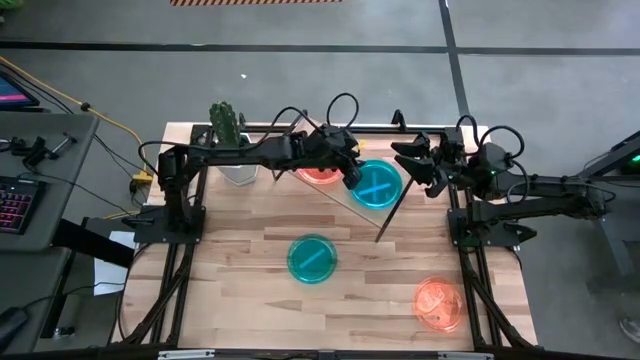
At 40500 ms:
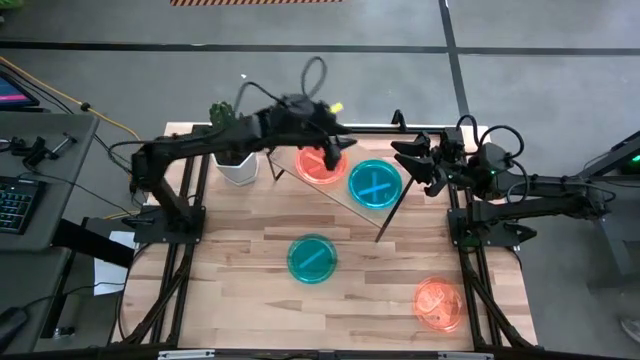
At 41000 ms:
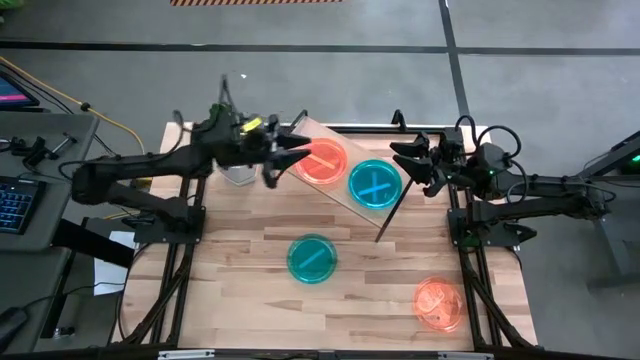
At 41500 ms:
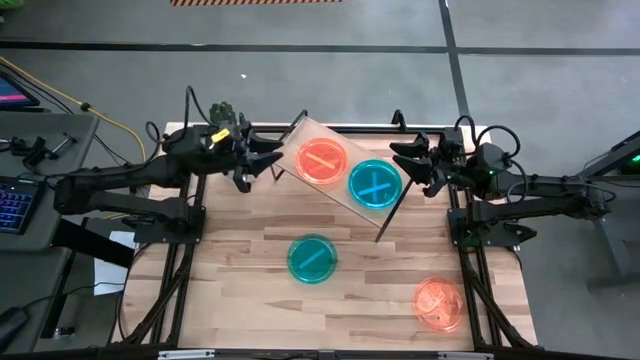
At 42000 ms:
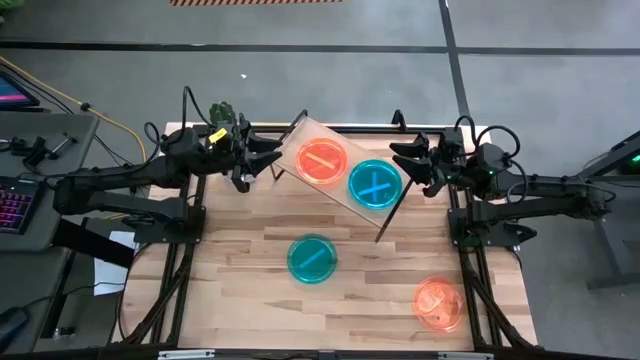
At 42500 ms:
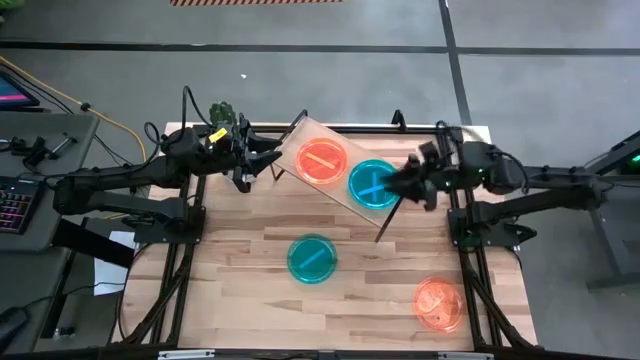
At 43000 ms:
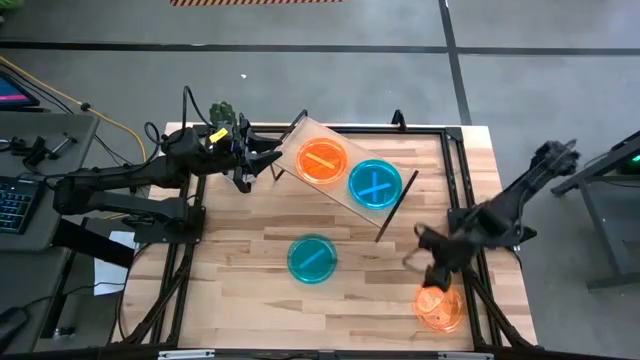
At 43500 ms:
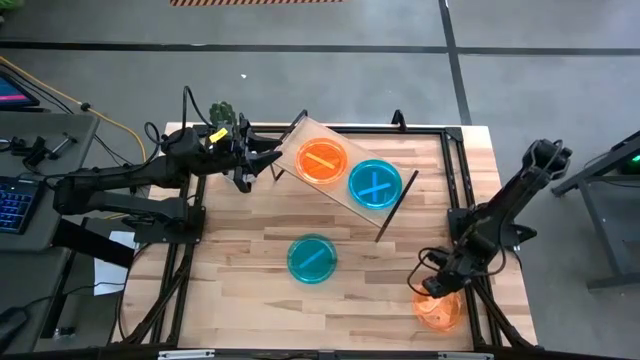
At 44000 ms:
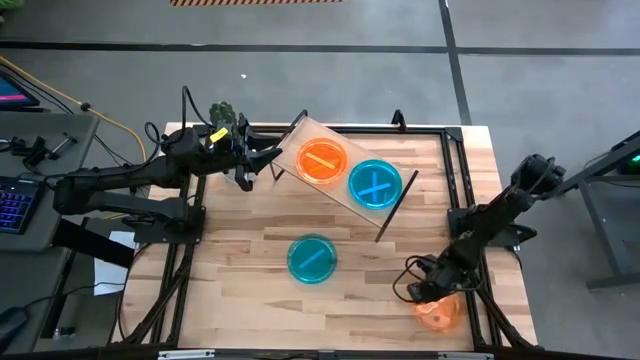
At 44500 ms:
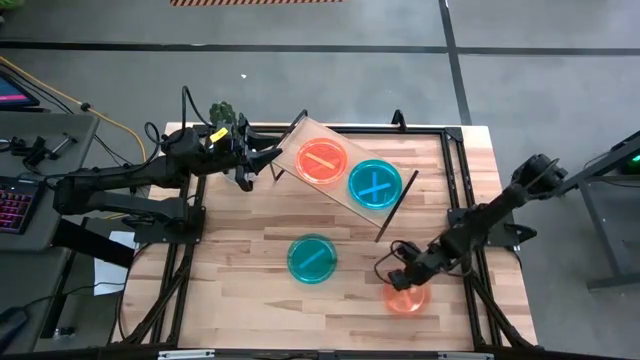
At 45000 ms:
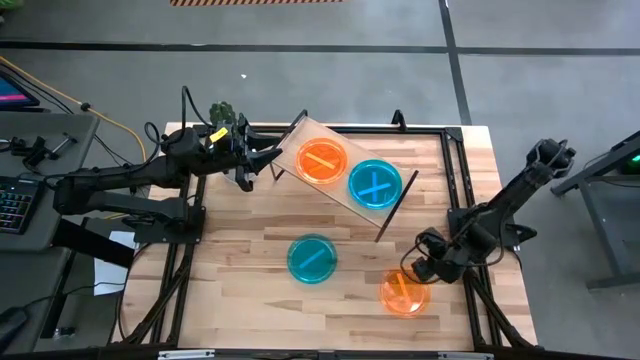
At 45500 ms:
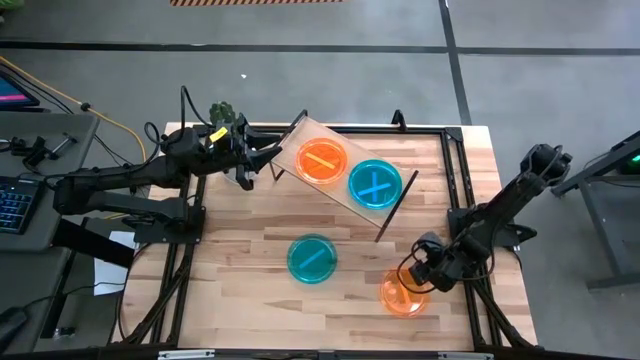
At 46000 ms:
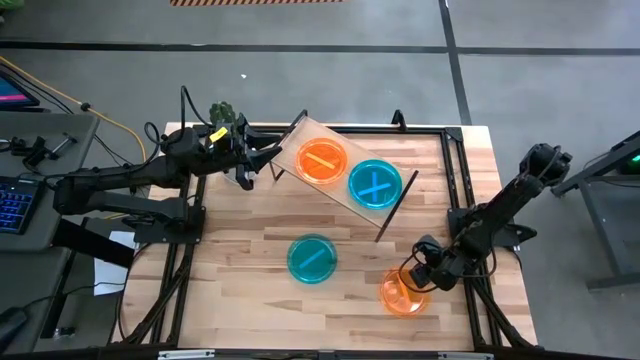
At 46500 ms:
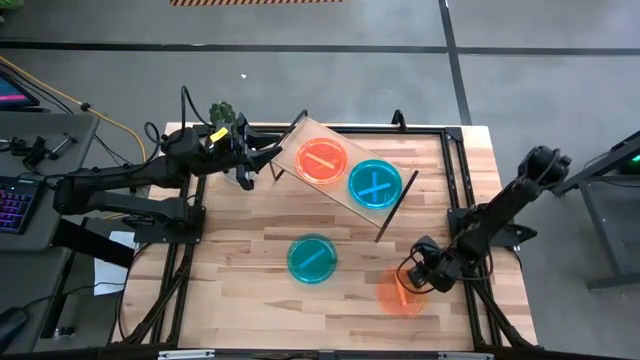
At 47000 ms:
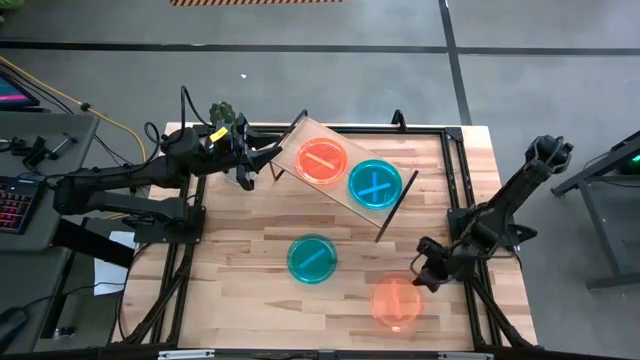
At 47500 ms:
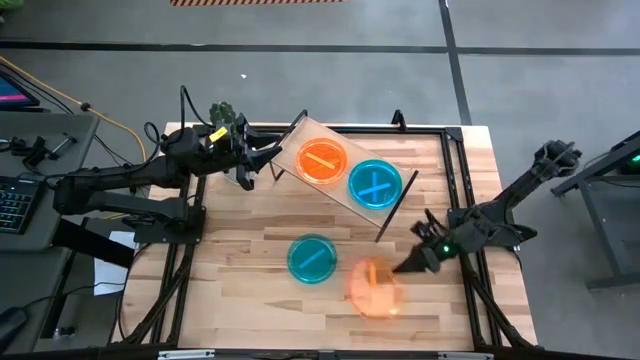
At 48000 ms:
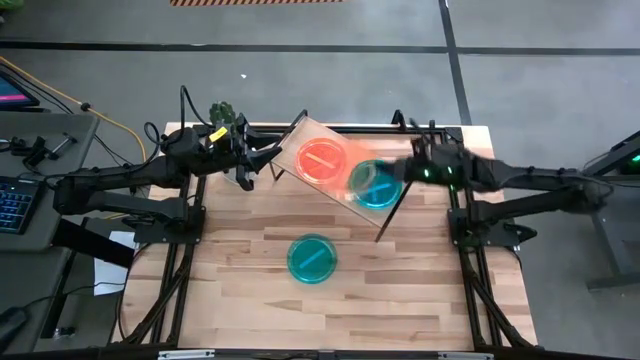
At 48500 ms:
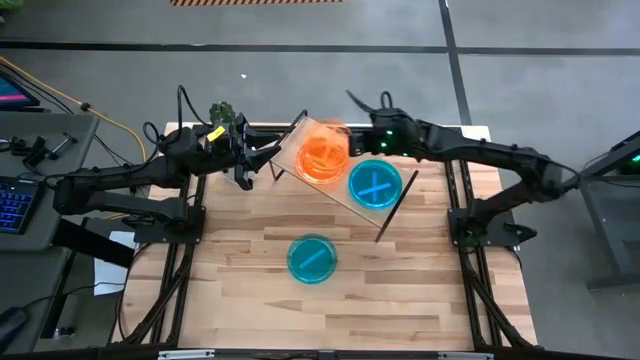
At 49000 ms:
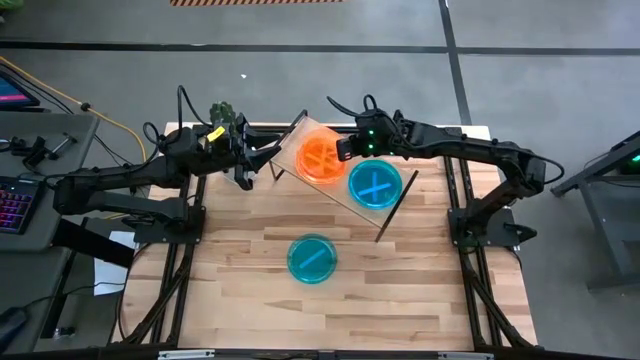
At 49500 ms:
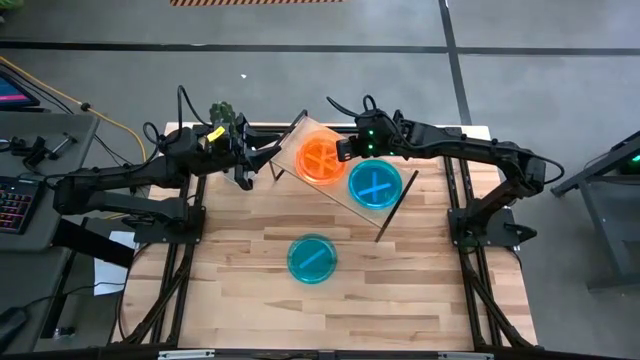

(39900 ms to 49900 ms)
Task: Place and stack plates onto a shelf
Stack the orange plate on top of the other orange plates on the shelf

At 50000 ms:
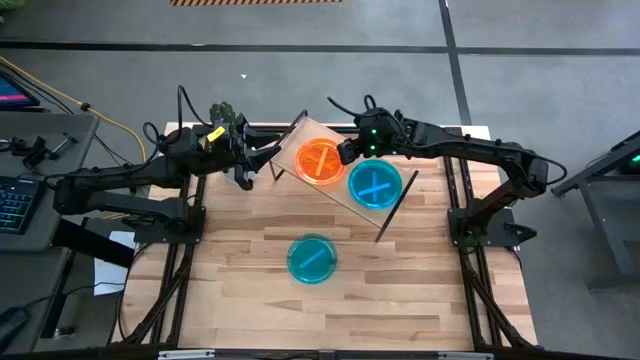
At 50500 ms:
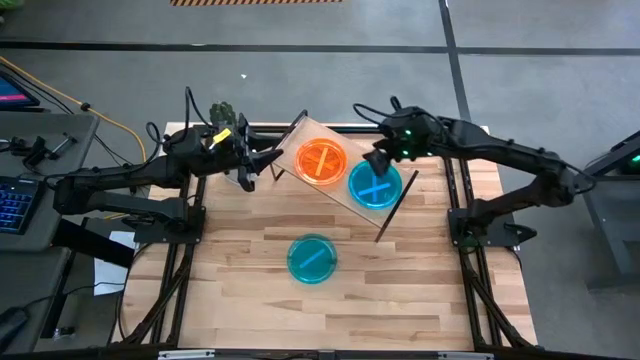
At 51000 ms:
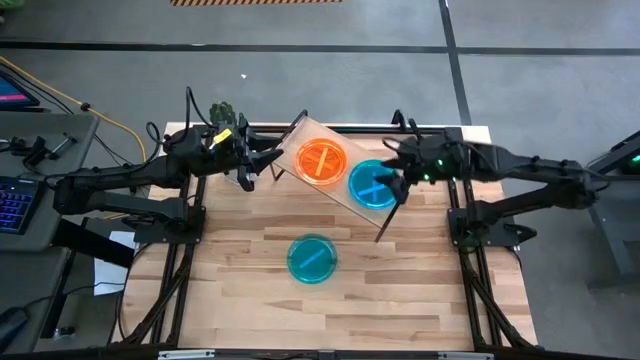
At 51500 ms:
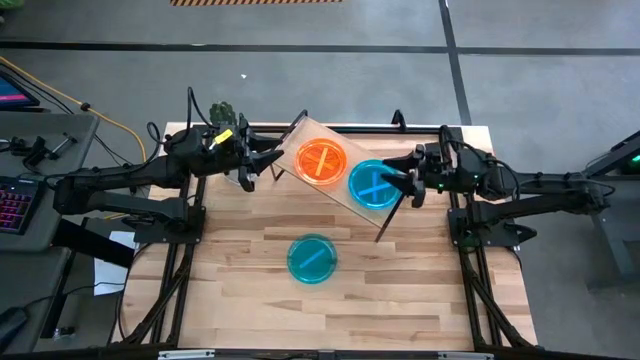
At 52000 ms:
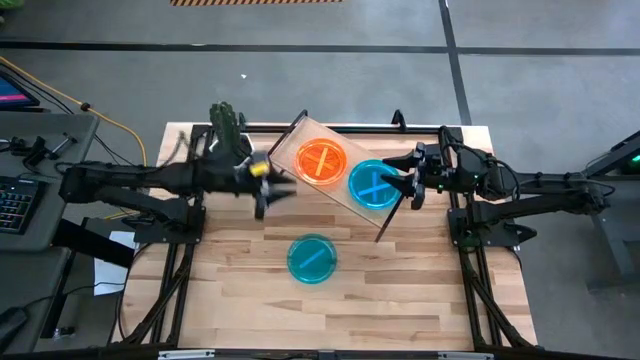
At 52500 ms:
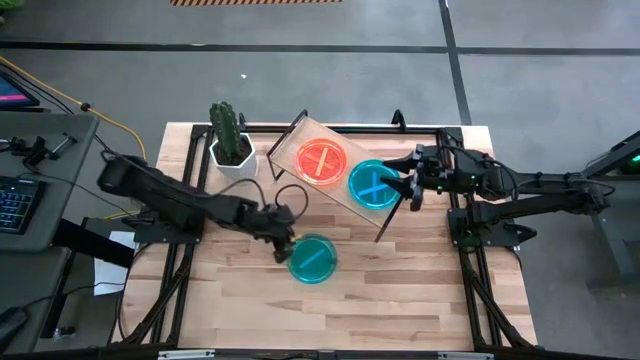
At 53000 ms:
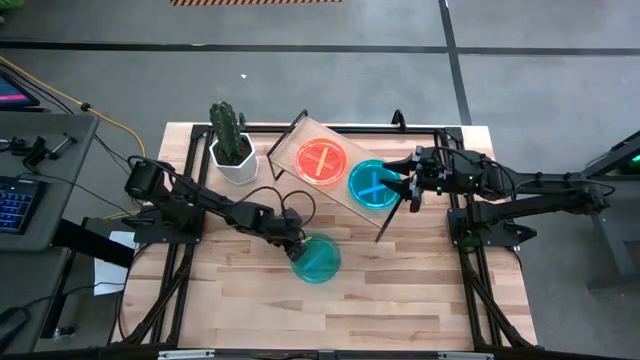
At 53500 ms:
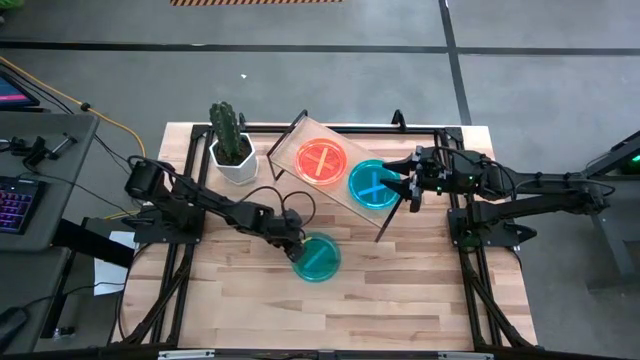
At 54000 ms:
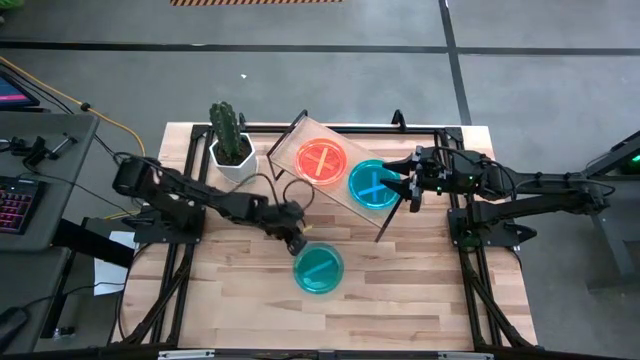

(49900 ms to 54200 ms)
Stack the blue plate on top of the other blue plates on the shelf

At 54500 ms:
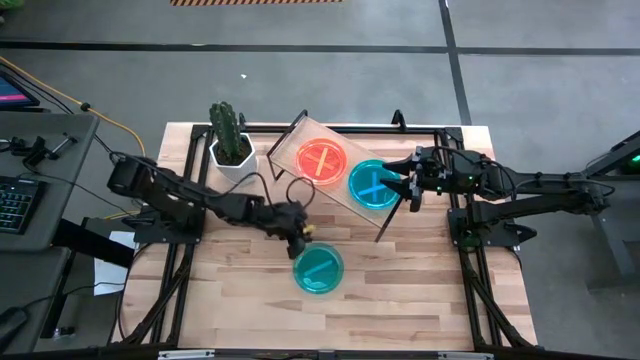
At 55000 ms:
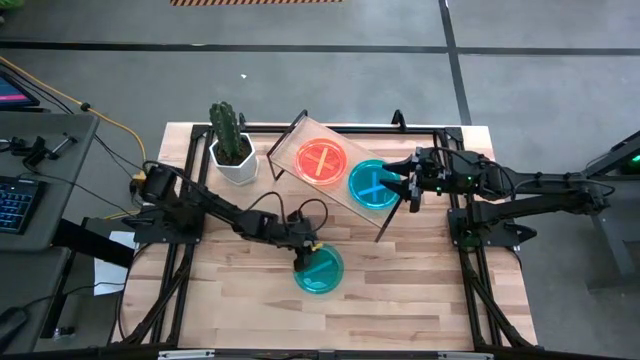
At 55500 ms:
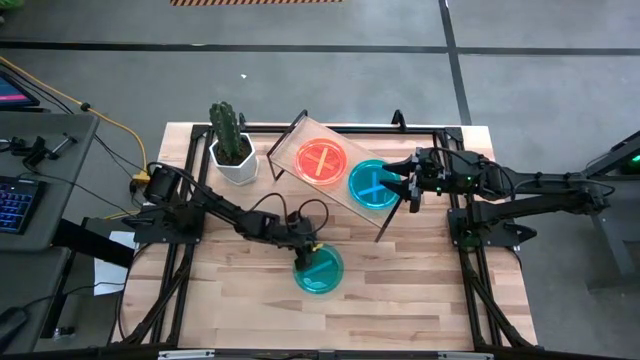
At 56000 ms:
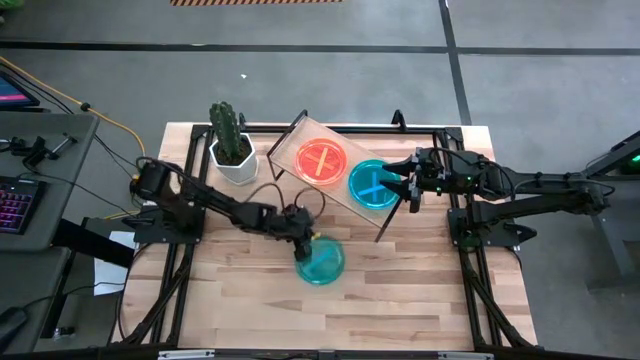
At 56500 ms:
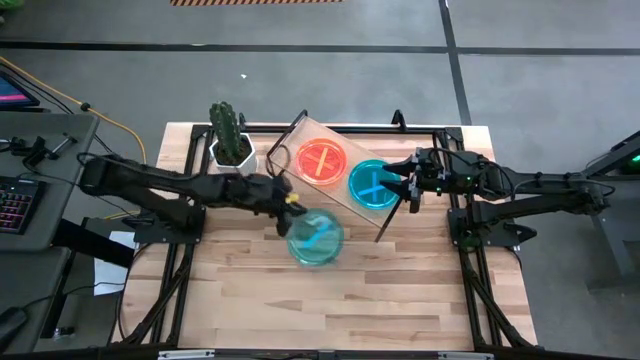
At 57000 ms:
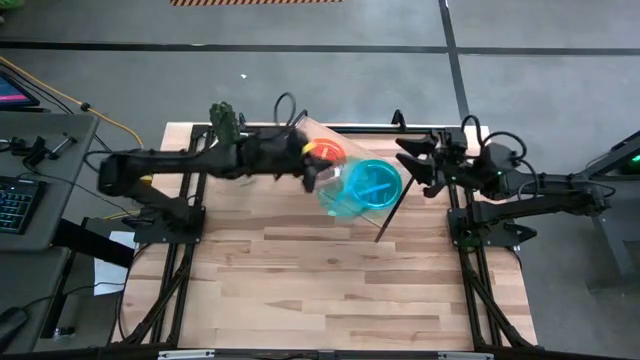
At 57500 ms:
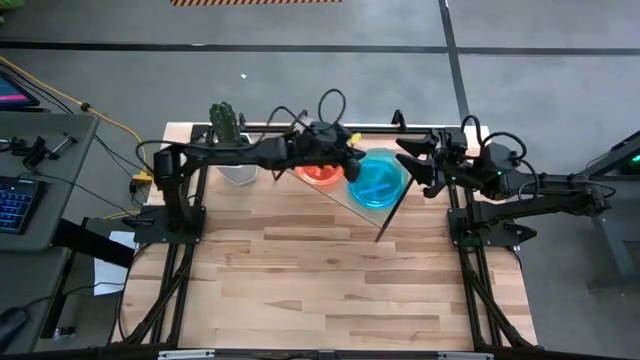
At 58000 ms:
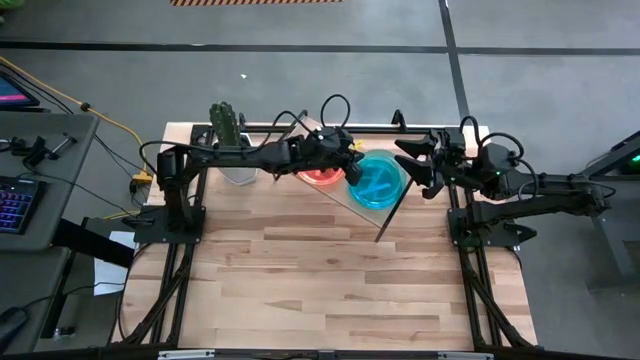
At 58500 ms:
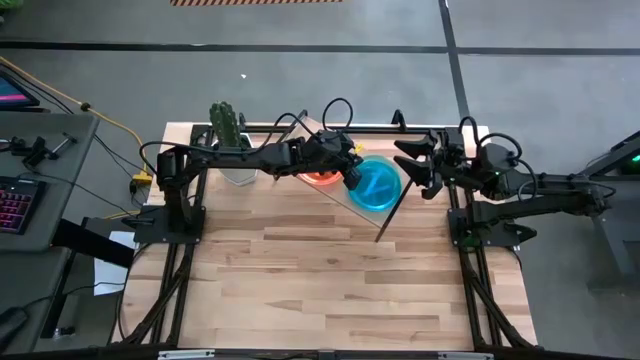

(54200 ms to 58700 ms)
Stack the blue plate on top of the other blue plates on the shelf

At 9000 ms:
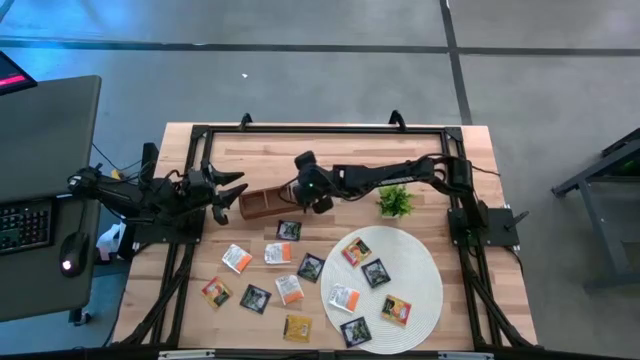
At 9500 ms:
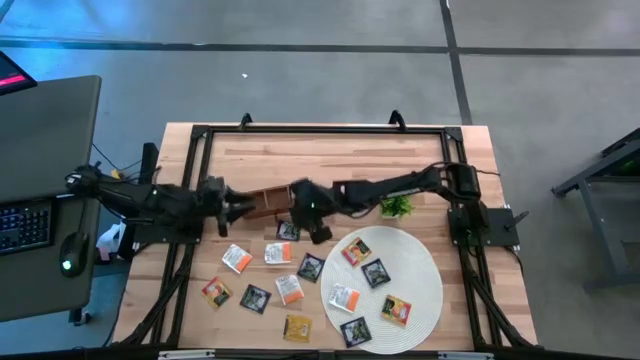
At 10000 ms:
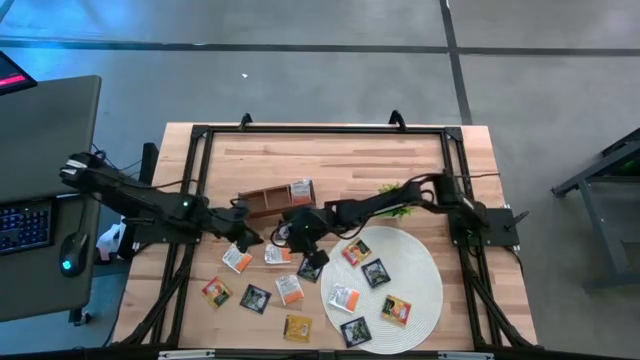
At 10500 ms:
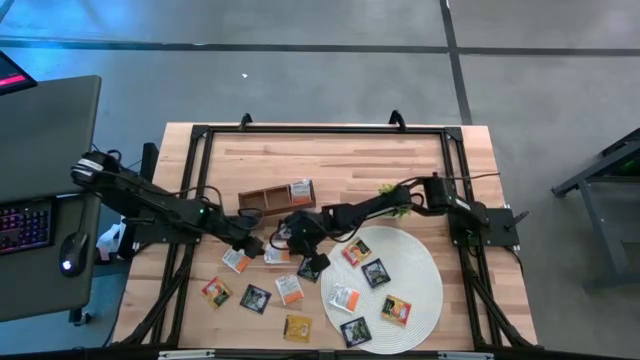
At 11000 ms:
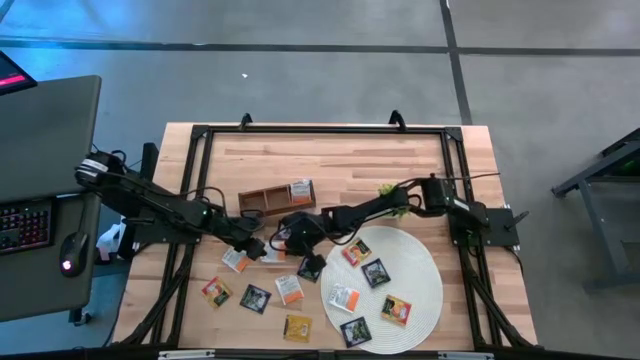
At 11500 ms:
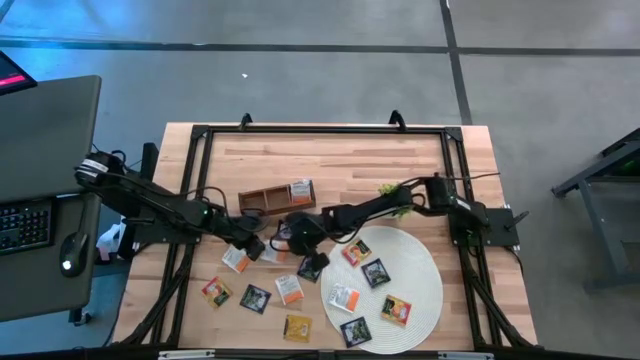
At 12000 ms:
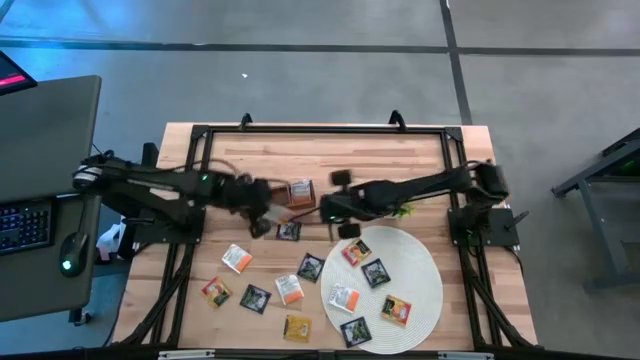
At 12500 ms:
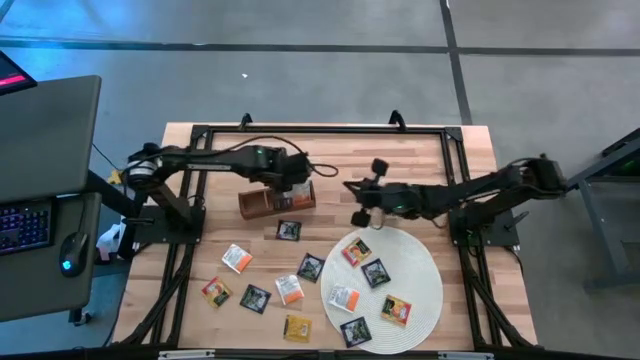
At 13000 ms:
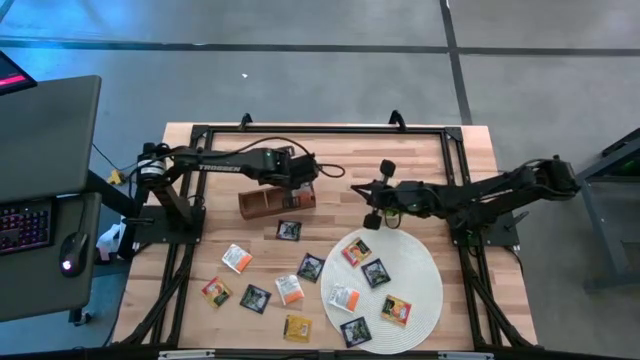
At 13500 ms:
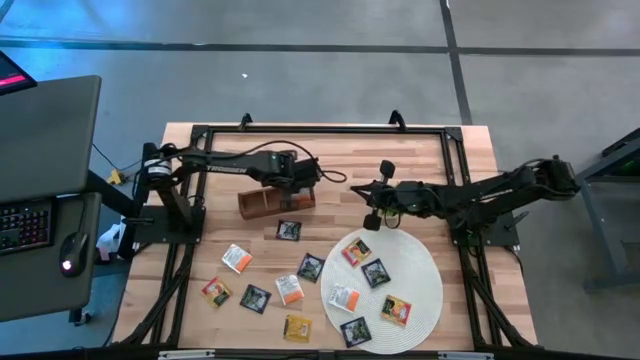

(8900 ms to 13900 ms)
Task: Pick & Place Tea
Put the white tea bag into the right section of the wooden organizer
